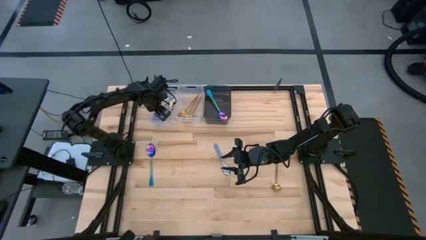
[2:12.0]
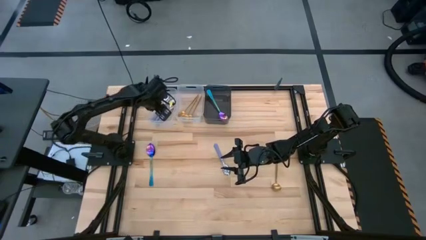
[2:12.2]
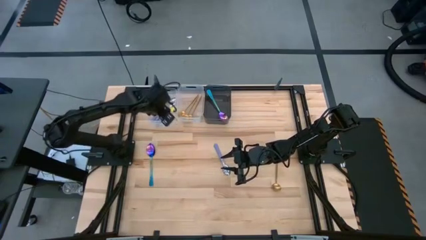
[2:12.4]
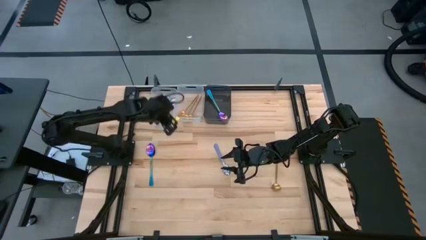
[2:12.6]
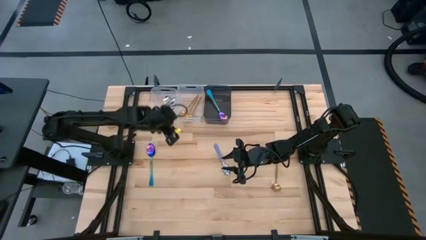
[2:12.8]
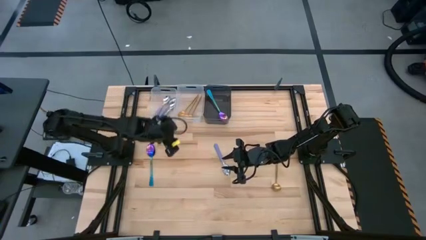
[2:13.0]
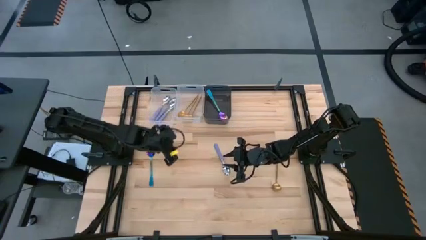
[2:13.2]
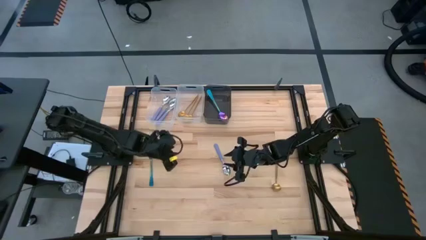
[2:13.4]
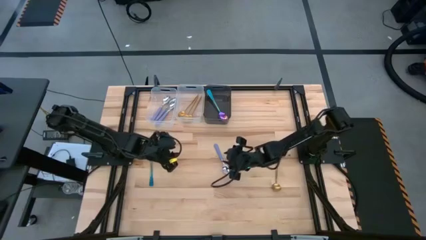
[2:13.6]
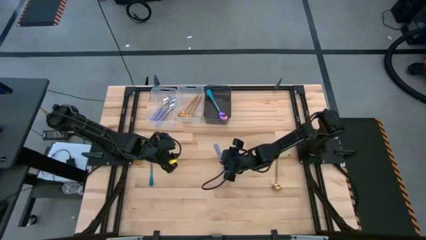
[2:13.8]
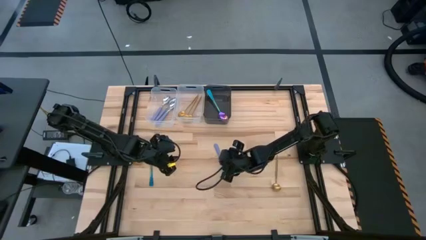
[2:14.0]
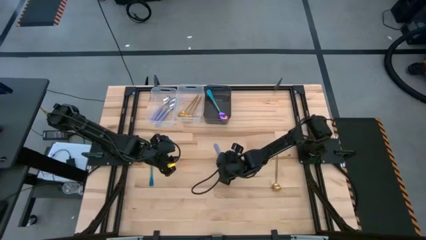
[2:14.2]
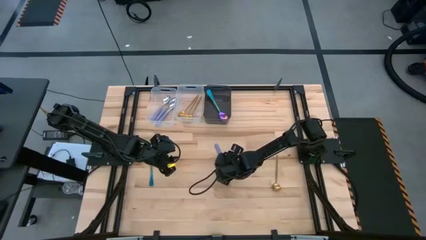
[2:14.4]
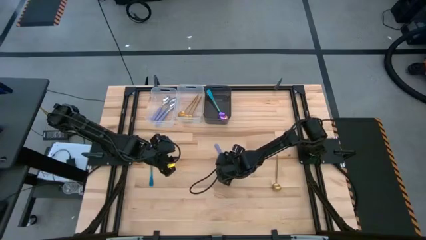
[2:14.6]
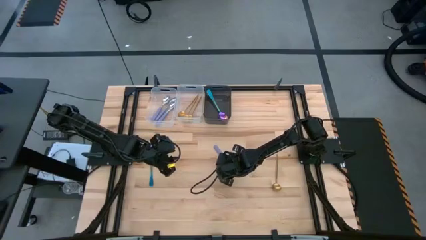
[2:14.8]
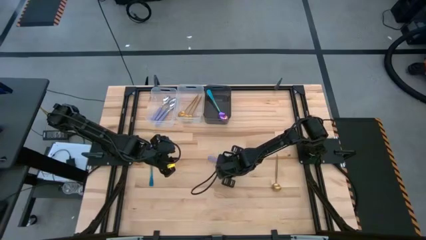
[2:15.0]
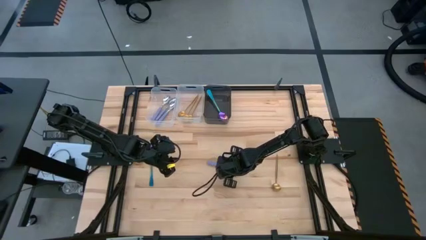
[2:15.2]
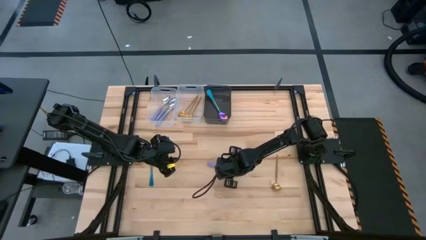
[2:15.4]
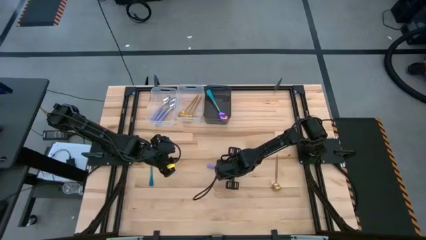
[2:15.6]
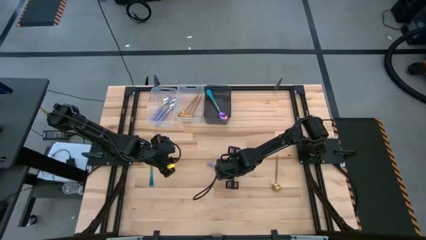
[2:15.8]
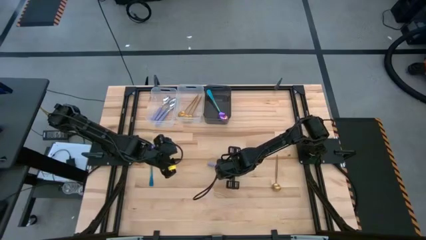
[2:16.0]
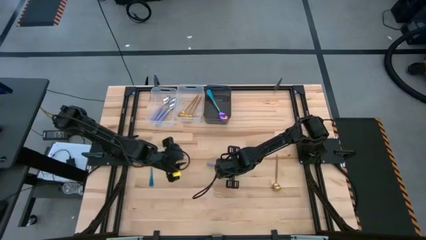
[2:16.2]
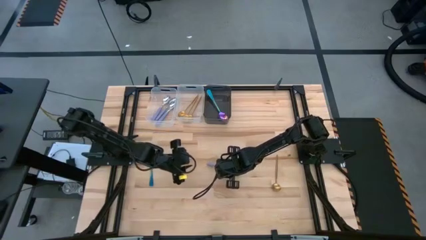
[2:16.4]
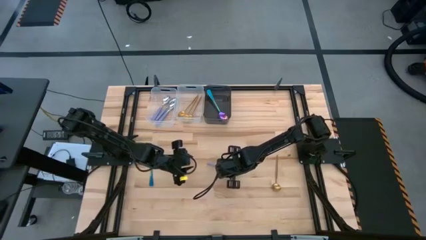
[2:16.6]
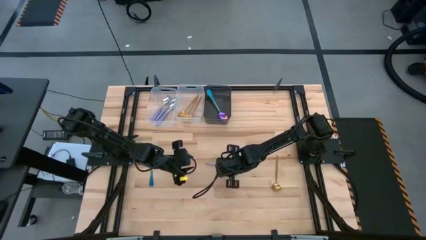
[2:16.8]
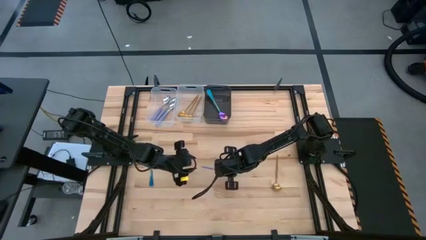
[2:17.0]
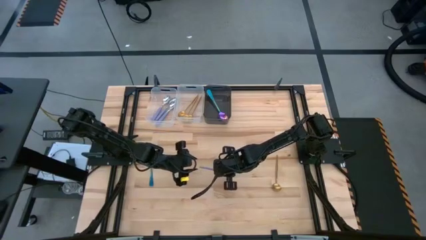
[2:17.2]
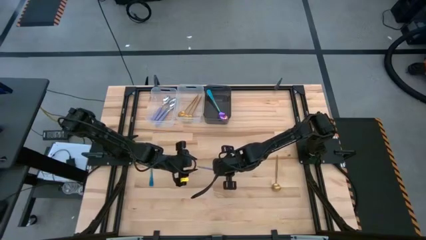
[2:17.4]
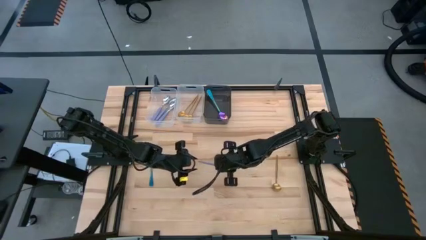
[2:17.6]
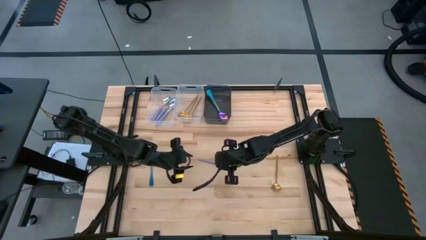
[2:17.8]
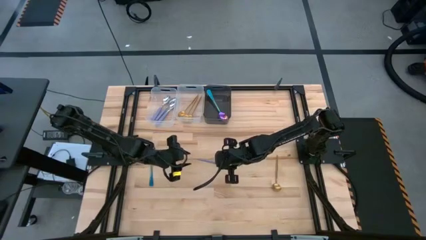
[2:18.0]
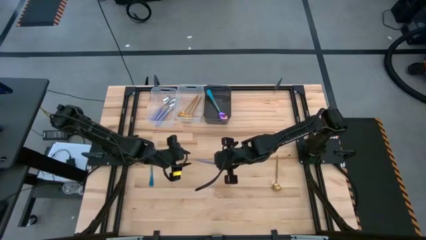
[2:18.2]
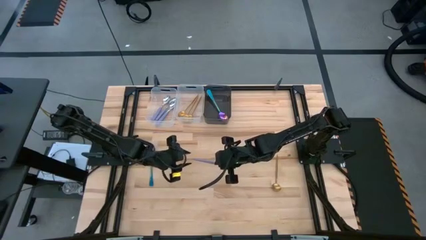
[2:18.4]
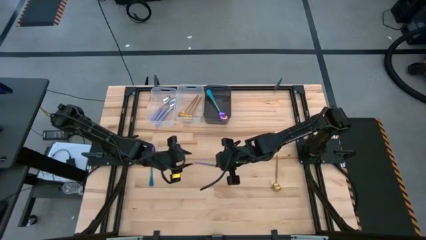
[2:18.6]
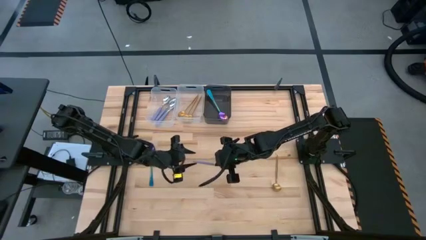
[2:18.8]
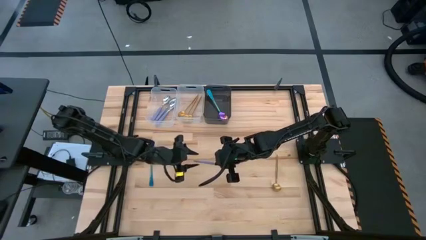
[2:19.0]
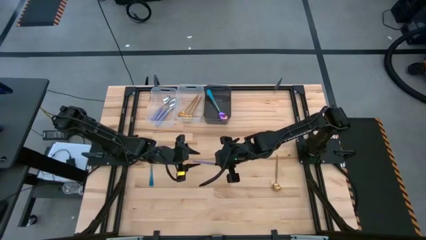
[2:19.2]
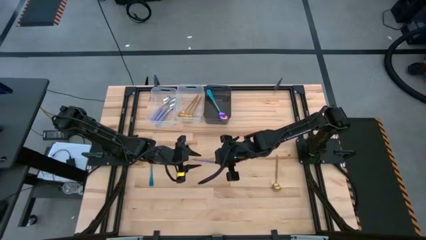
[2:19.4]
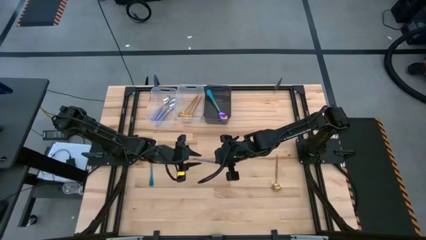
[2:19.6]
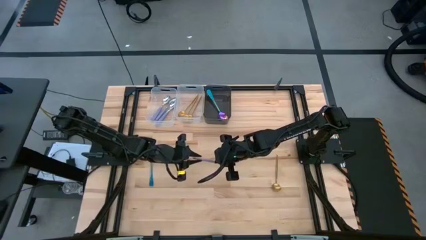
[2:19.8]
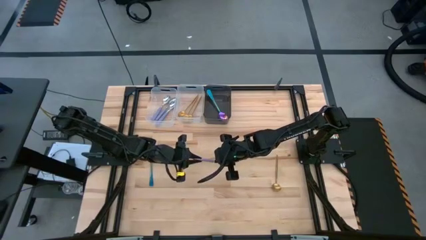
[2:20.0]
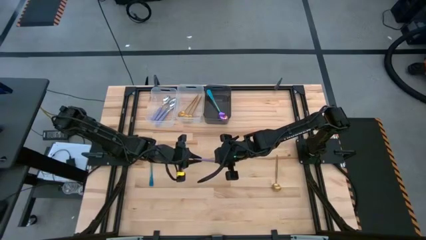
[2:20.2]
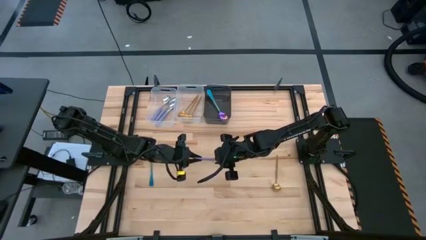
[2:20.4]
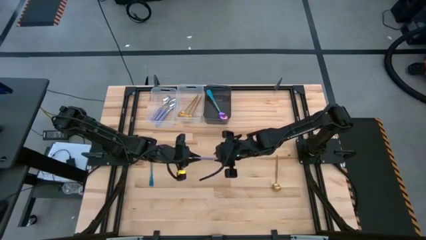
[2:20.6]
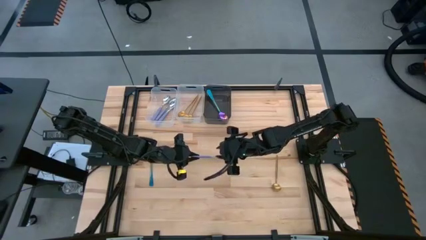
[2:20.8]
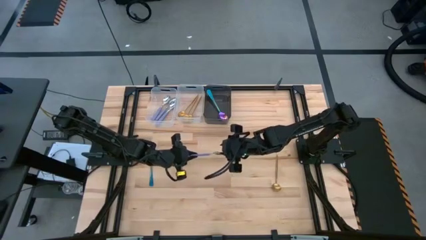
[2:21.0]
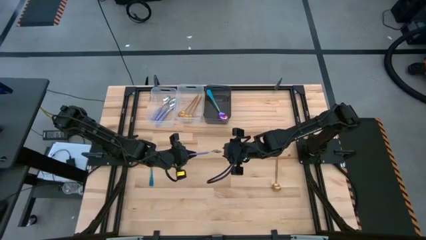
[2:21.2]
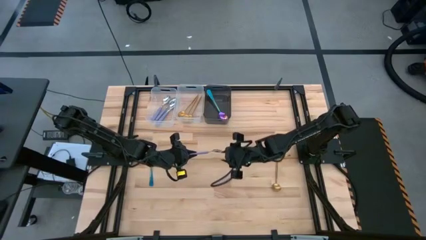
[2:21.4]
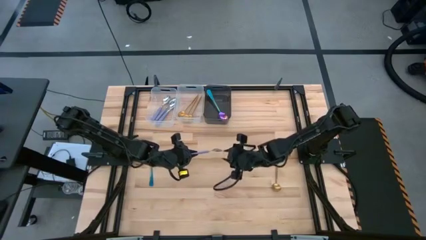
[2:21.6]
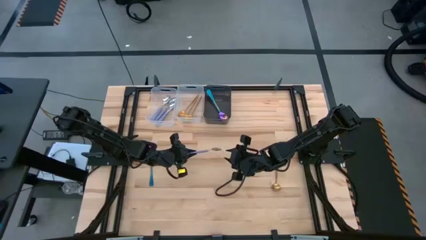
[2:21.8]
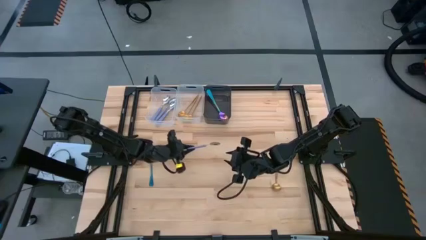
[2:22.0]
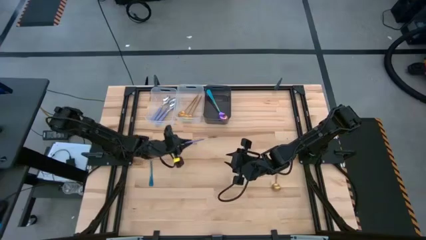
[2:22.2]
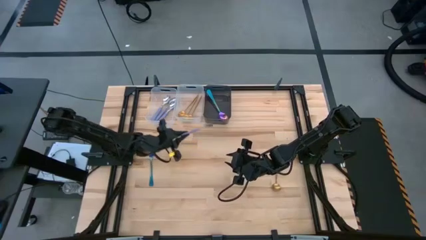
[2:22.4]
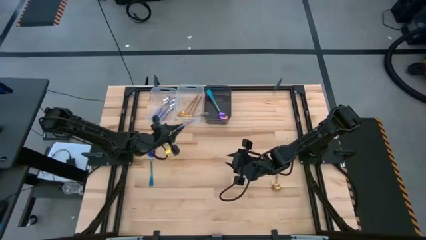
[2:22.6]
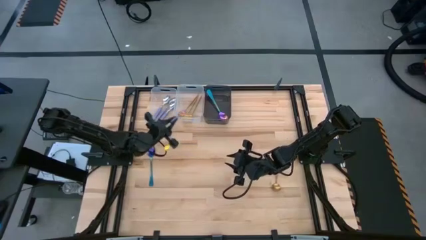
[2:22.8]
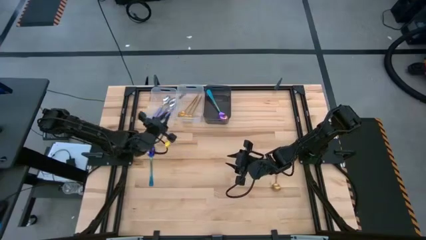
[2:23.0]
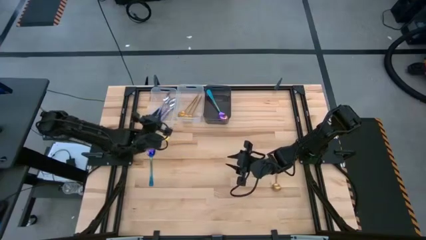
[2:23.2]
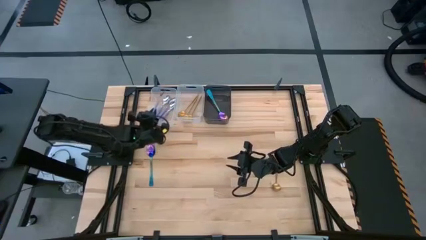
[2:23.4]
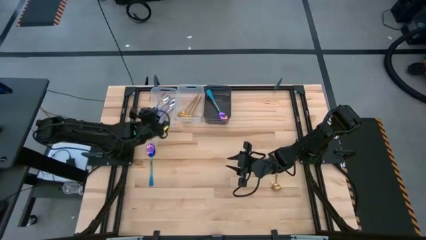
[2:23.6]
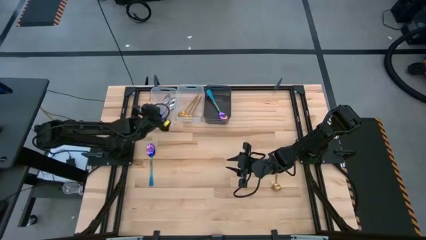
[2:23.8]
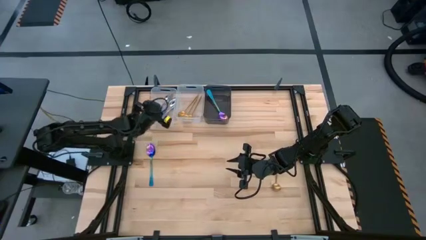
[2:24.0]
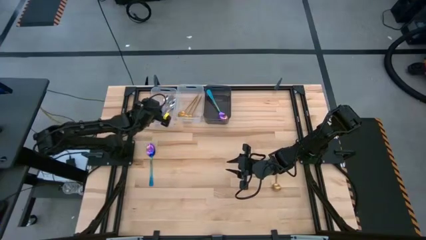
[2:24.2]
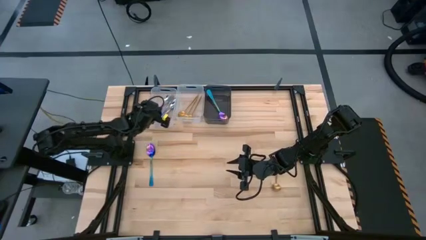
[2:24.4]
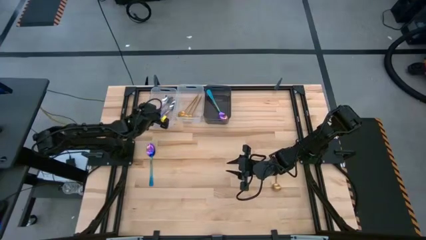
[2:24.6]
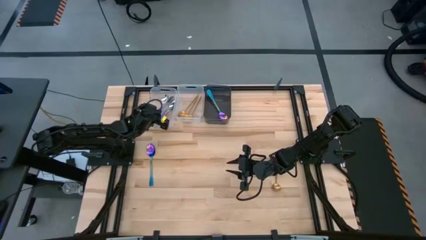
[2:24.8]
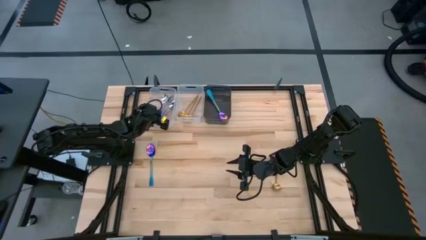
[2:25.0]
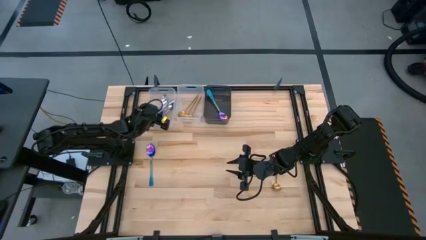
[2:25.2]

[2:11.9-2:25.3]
Task: Sort silverware by color (type)
Put the violet spoon into the left transparent bin

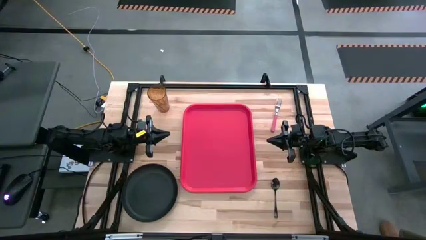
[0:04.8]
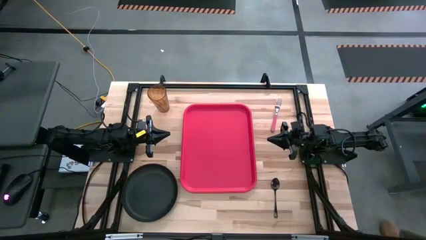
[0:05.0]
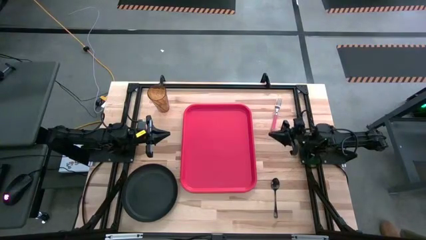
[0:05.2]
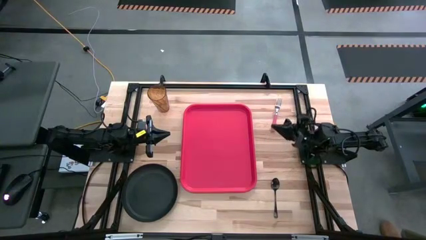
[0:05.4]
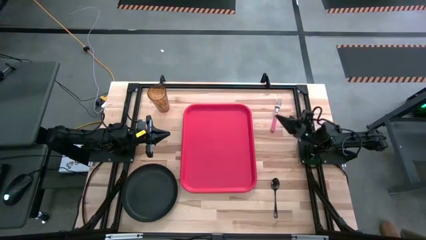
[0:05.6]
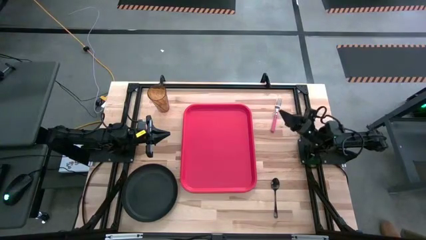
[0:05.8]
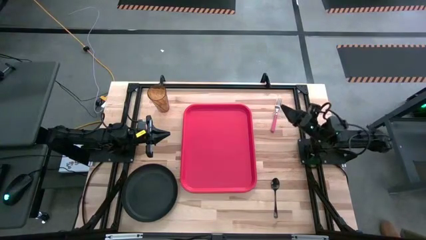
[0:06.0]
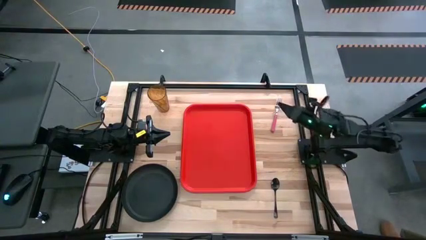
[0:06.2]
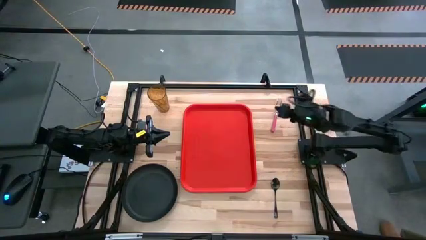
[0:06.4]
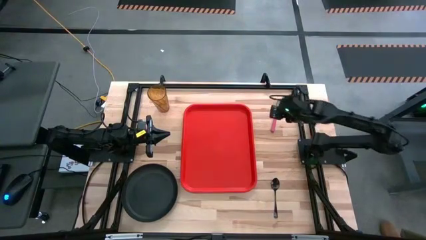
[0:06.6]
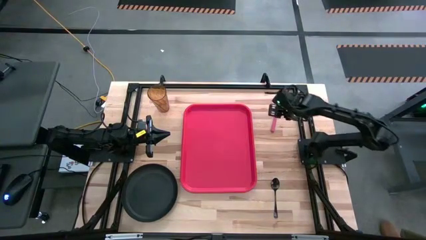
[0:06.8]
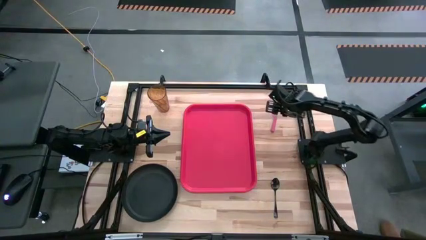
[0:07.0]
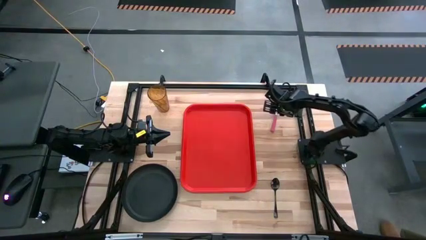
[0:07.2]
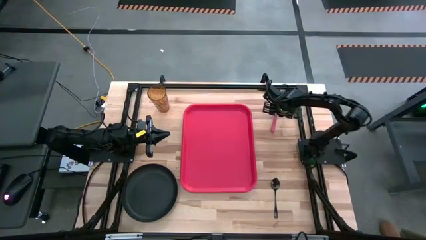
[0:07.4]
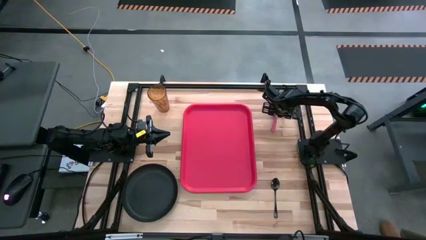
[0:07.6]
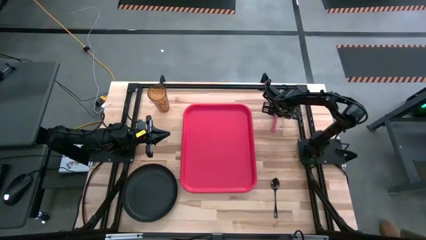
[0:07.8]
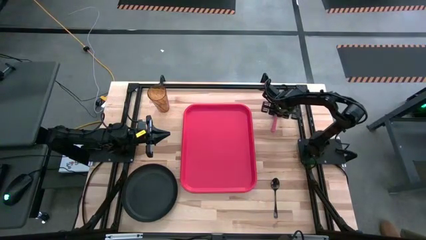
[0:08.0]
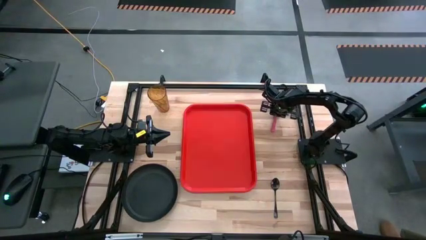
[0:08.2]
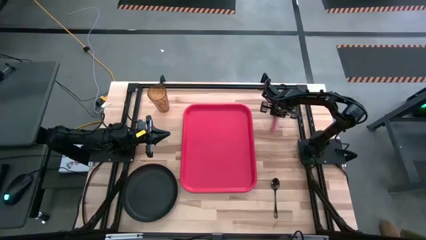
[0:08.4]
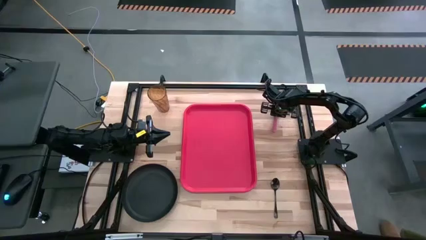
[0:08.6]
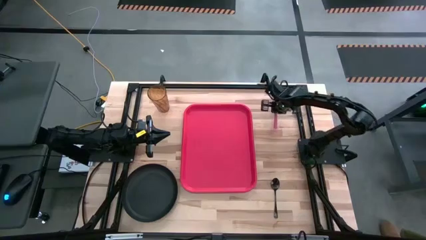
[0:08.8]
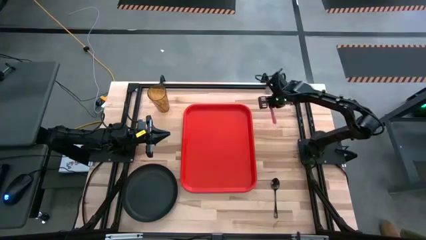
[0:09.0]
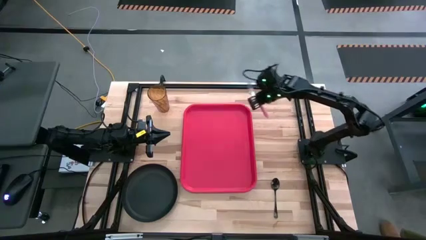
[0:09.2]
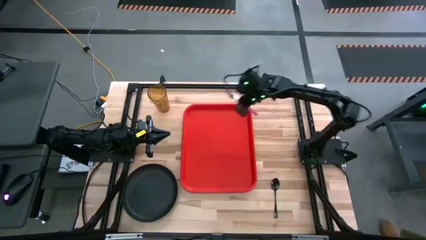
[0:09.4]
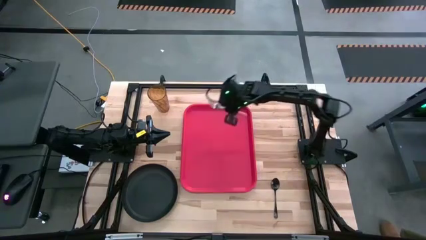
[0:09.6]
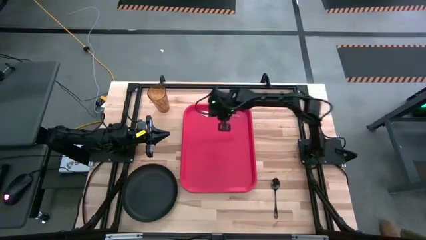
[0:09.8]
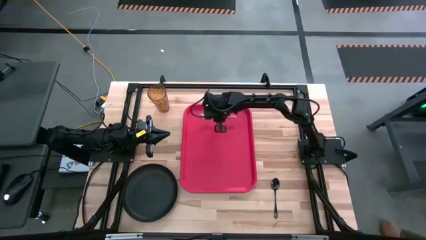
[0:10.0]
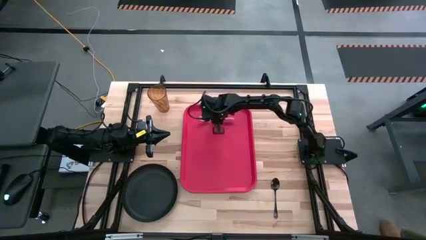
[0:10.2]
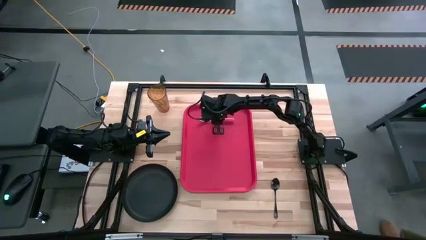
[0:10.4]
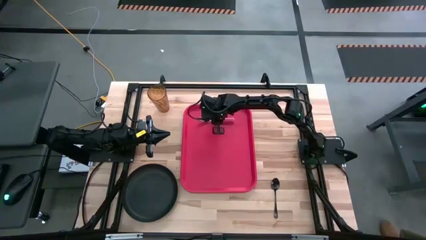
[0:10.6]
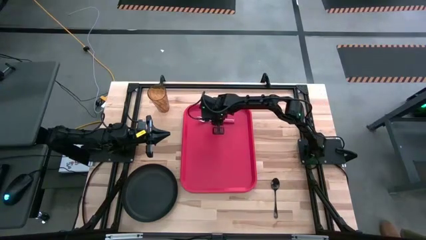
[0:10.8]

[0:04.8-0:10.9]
Task: Pick and place plate/cup/fork/spoon on tray
Put the pink fork on the top of the red tray
